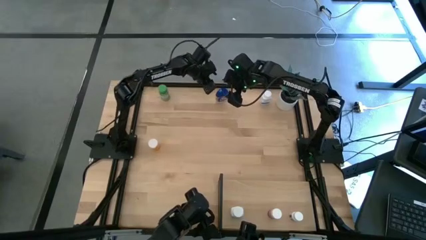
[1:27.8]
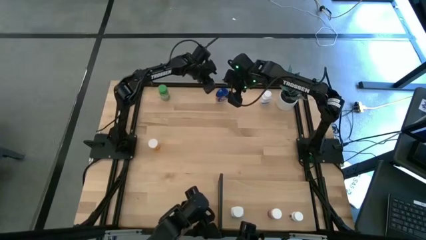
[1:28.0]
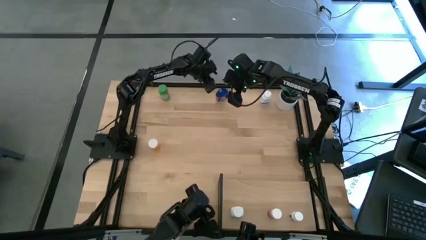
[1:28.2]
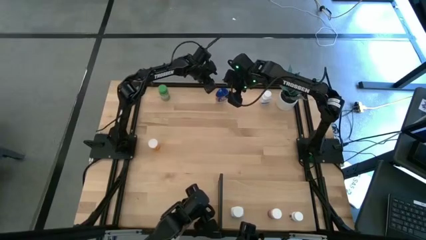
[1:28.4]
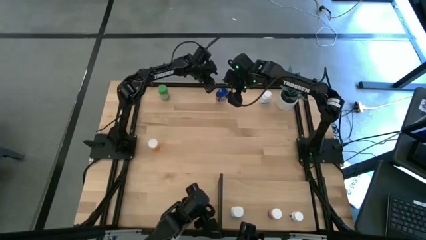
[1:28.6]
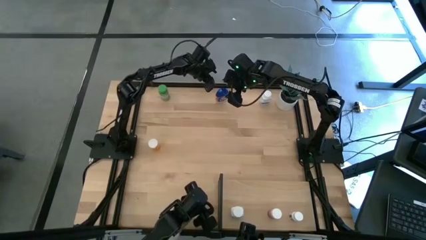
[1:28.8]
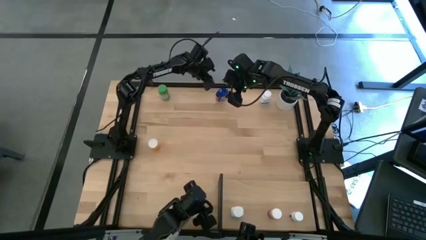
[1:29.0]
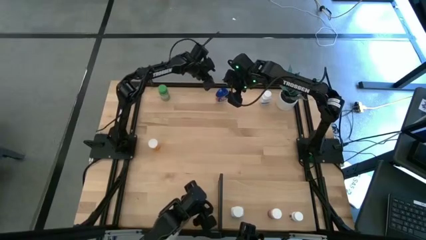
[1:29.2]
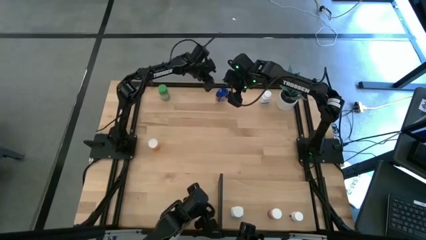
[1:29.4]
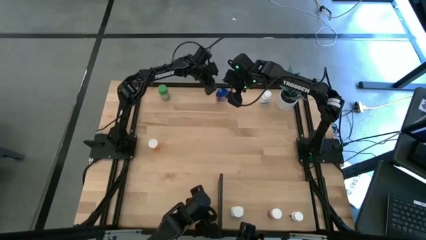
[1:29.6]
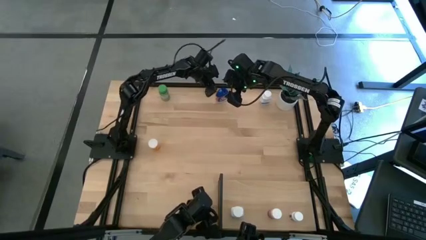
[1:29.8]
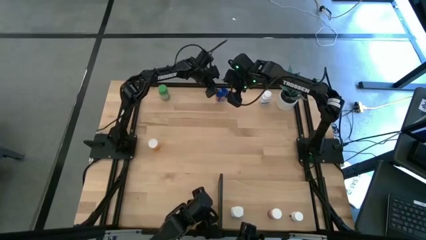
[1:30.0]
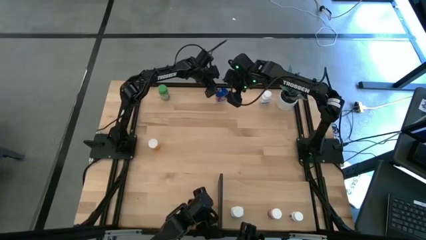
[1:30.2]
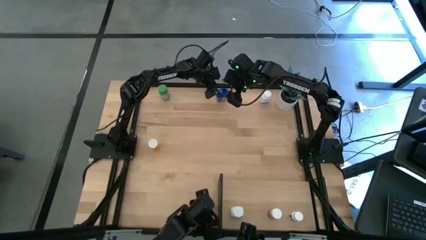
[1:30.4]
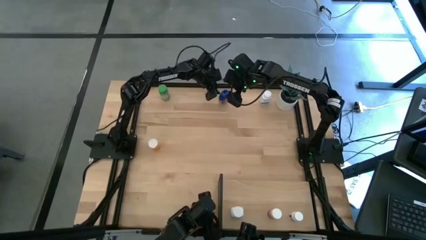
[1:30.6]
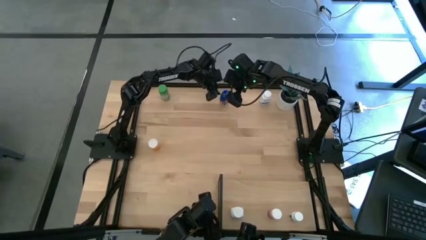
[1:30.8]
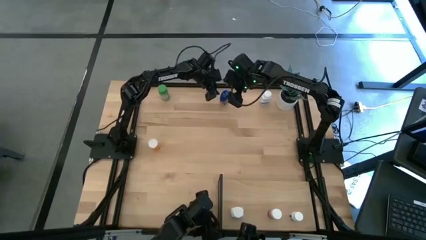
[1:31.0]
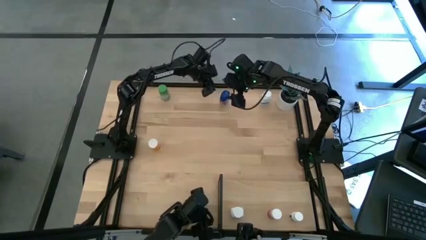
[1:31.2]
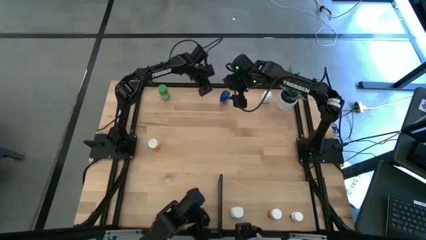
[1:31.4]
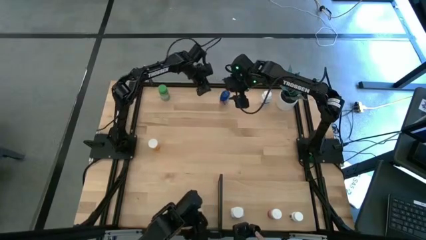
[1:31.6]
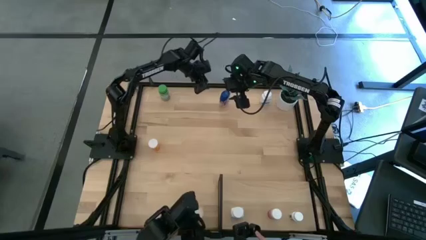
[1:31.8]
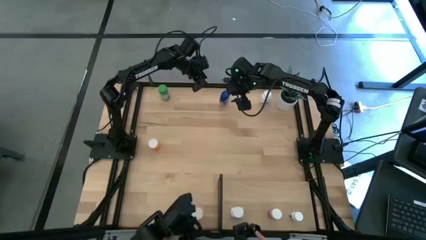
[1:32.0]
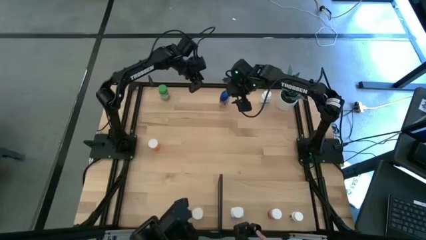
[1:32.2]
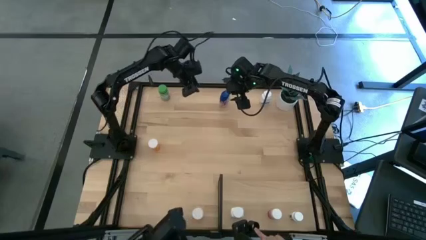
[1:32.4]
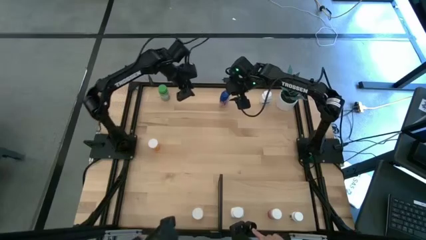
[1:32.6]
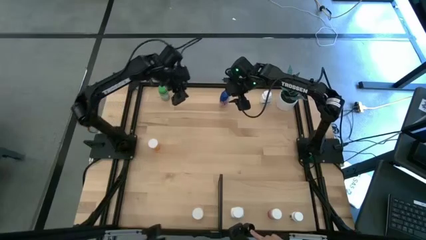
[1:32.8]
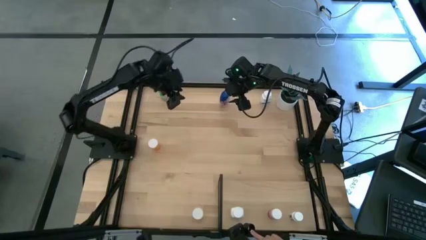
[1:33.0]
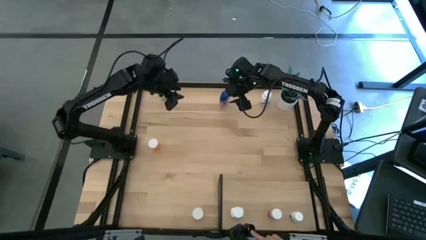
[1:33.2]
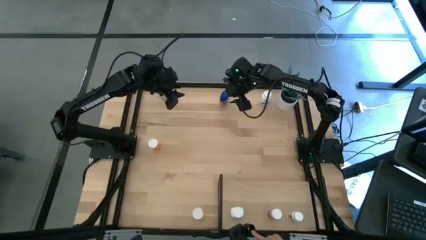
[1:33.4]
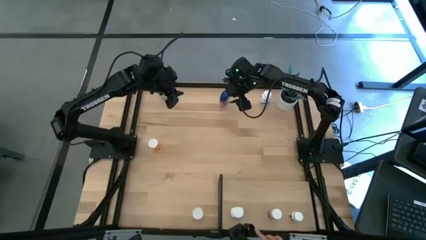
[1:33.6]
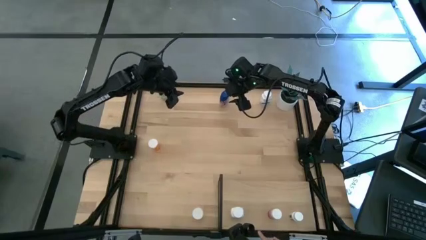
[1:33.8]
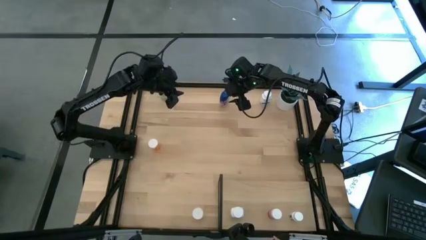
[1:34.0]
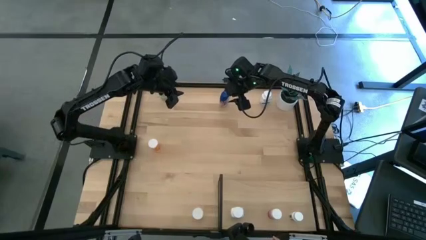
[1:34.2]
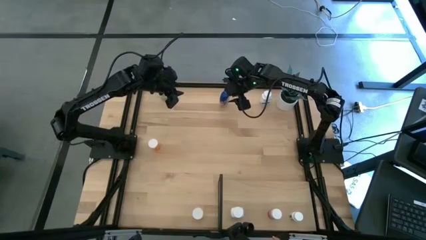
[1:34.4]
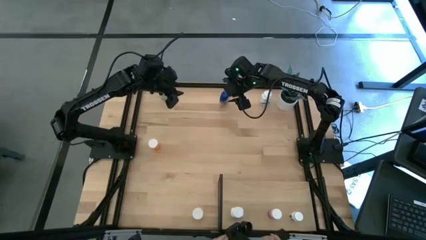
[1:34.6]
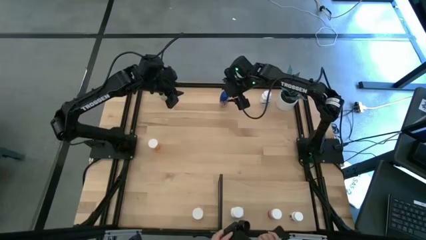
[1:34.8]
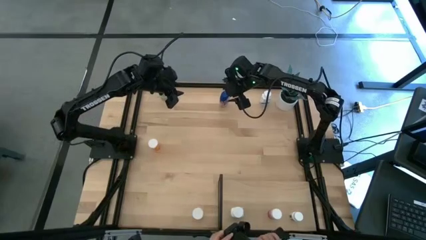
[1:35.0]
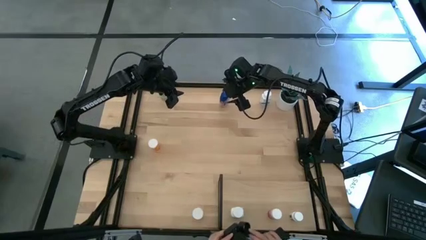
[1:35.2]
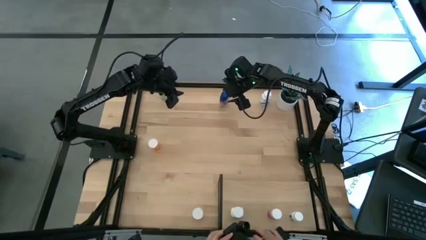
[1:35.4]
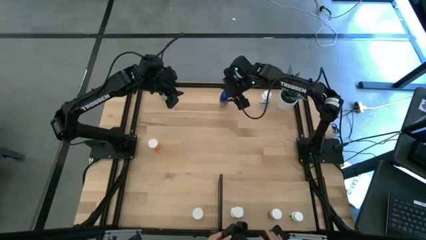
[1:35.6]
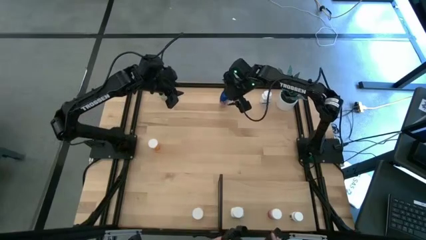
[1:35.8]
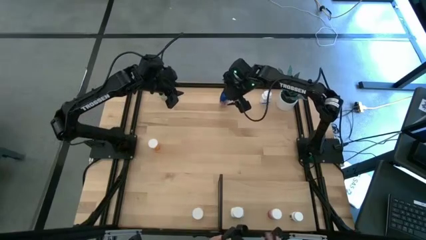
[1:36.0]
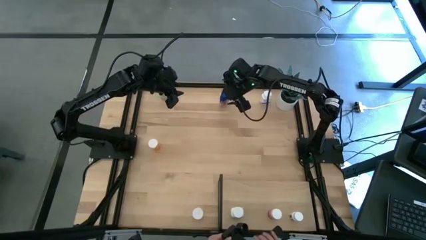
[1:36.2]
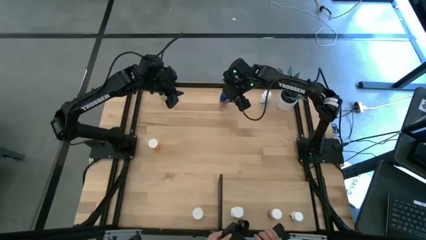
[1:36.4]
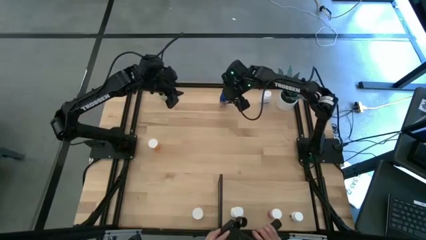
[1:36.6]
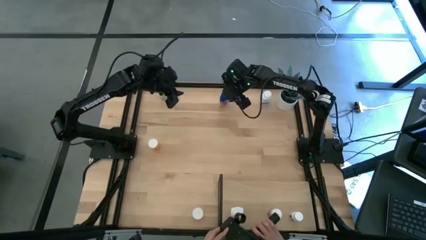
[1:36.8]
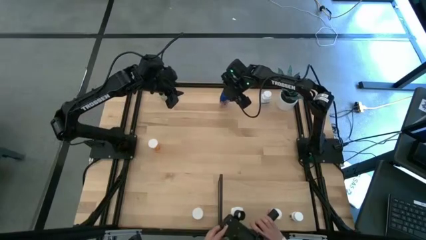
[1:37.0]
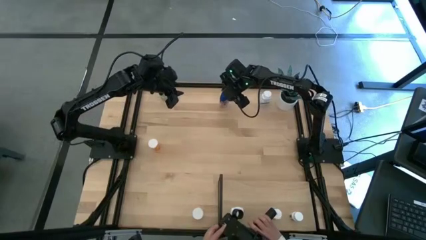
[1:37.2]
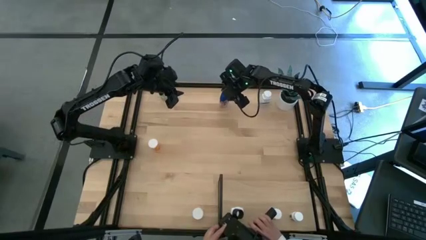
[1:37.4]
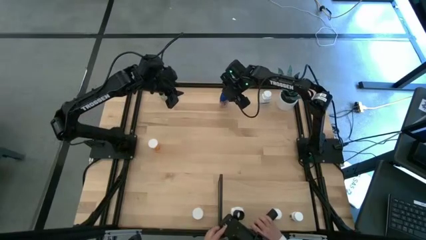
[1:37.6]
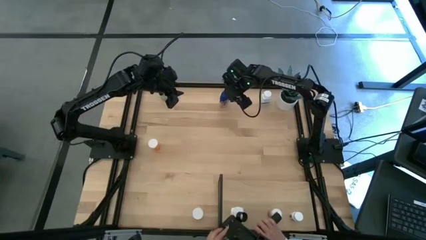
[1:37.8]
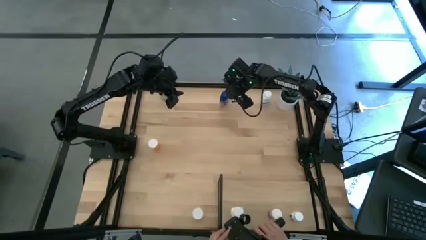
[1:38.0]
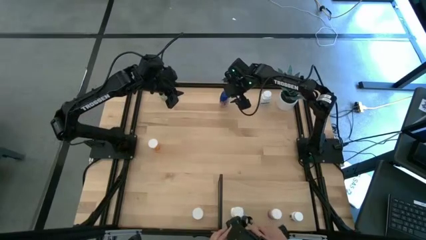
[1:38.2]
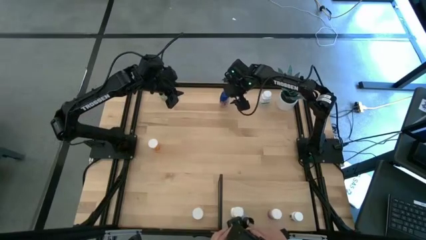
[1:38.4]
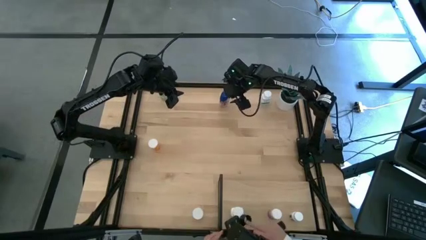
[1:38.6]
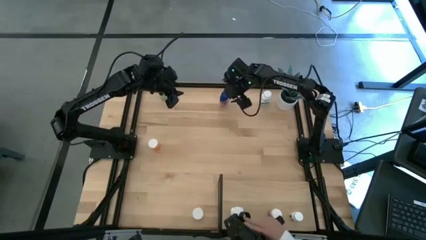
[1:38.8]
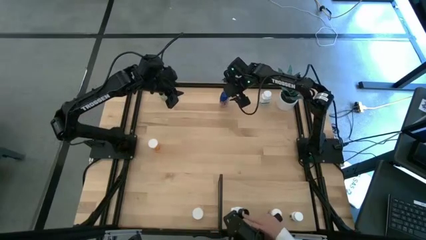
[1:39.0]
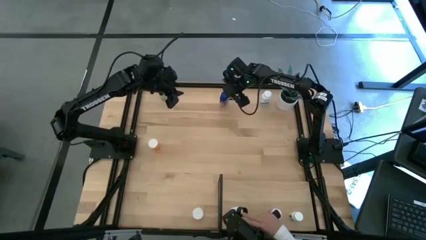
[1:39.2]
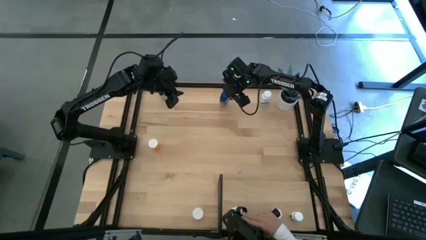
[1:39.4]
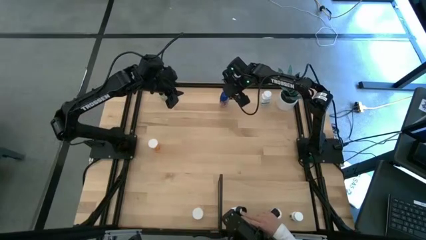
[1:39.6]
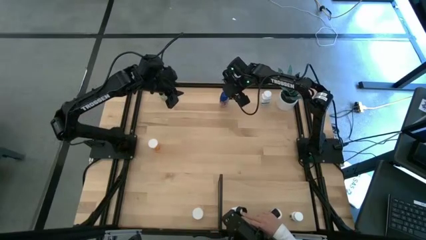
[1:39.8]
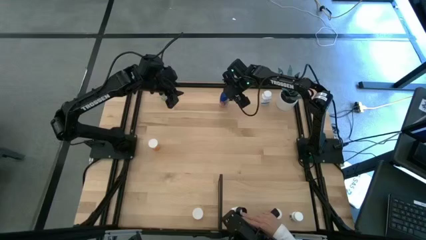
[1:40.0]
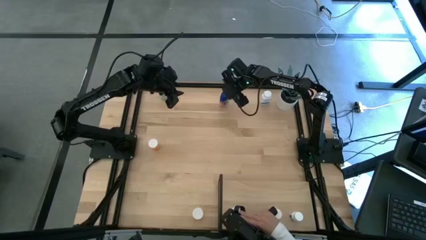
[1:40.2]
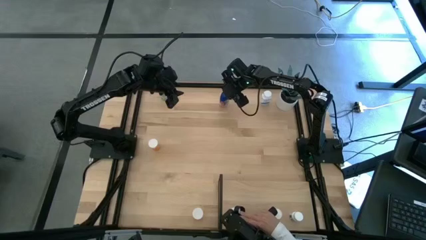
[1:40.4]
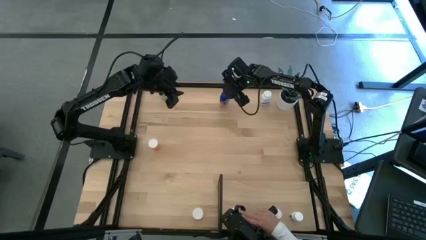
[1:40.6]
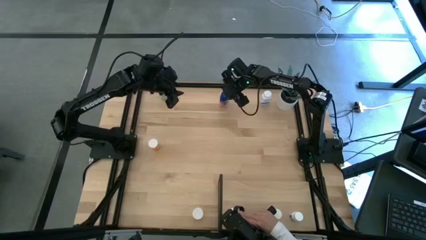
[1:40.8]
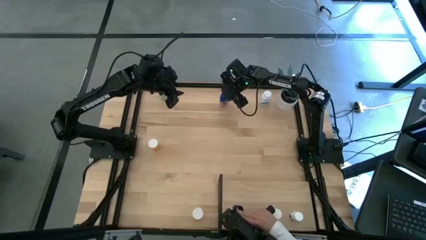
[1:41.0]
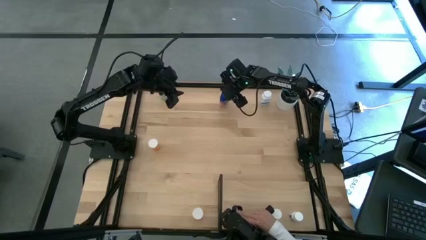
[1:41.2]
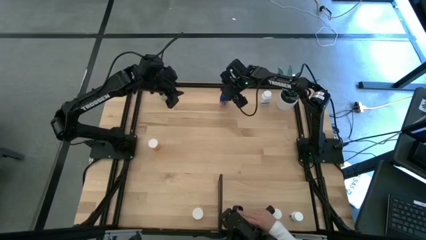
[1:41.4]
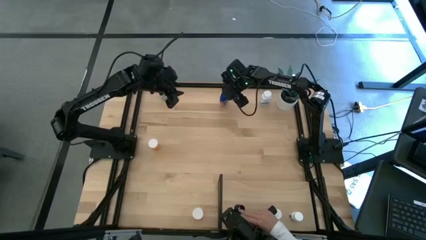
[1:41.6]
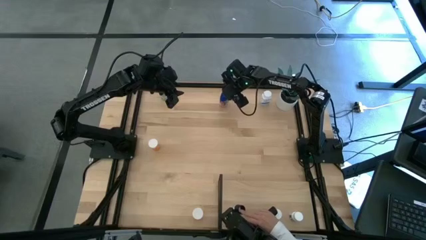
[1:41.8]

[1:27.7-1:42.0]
Task: Pick and place medicine bottles onto shelf by color
Put the blue pill bottle onto the shelf
